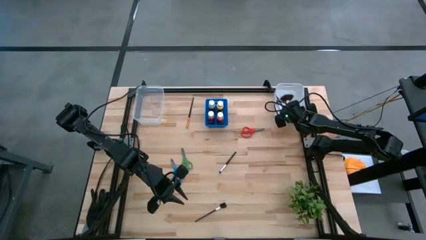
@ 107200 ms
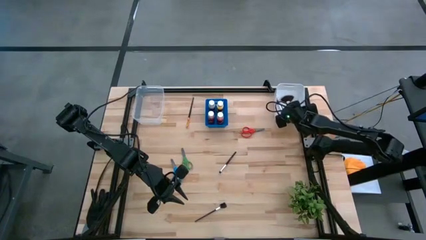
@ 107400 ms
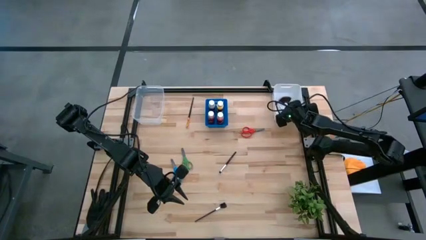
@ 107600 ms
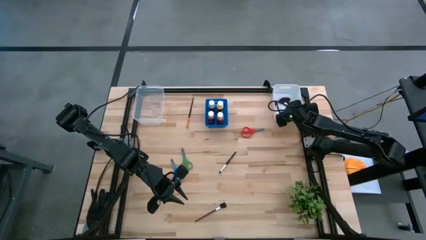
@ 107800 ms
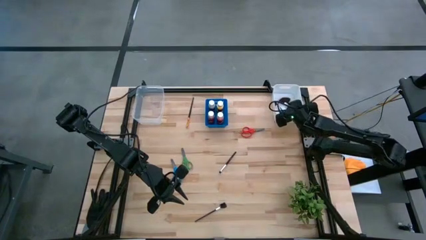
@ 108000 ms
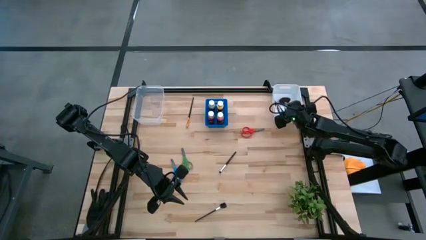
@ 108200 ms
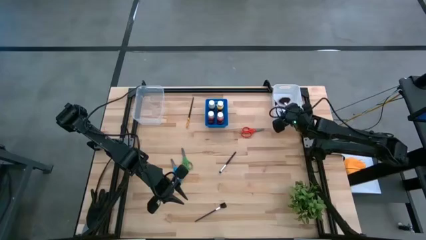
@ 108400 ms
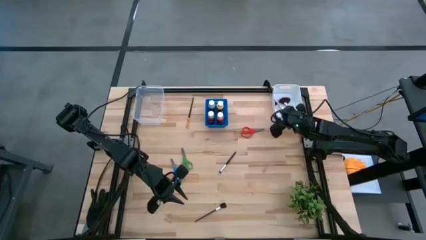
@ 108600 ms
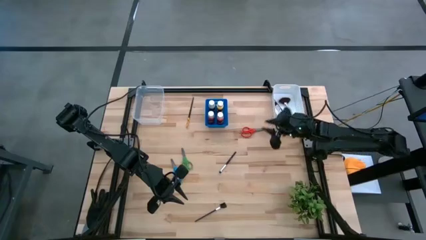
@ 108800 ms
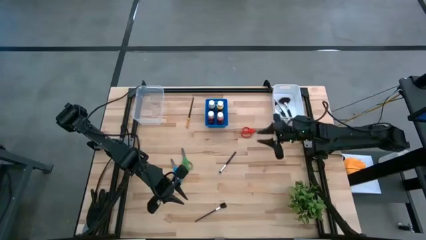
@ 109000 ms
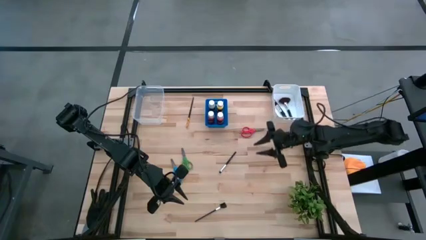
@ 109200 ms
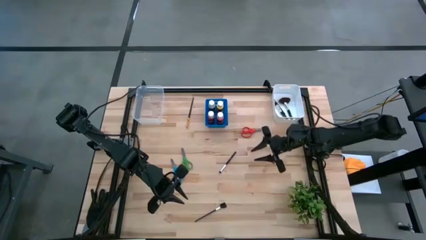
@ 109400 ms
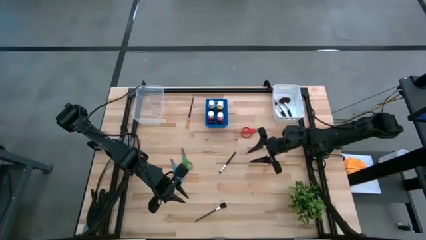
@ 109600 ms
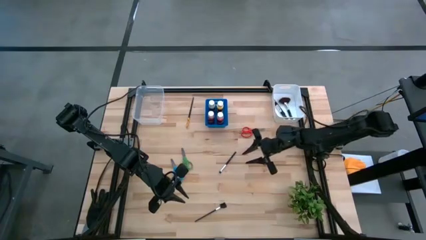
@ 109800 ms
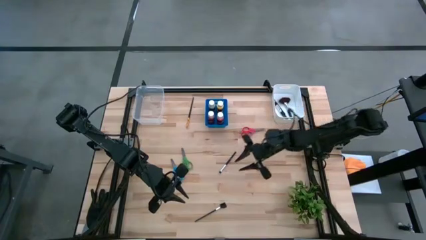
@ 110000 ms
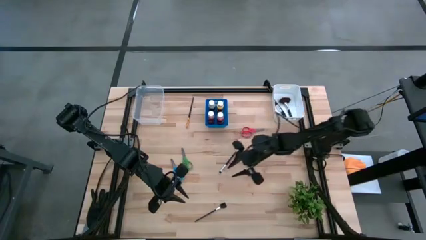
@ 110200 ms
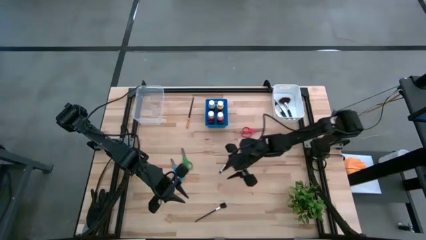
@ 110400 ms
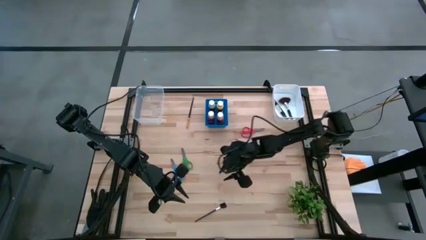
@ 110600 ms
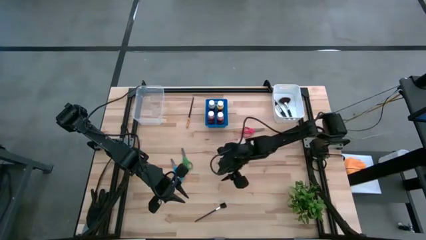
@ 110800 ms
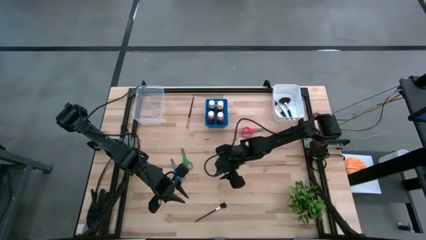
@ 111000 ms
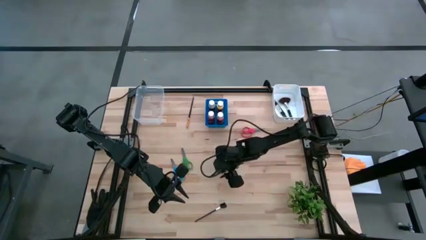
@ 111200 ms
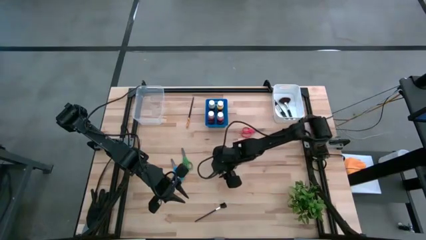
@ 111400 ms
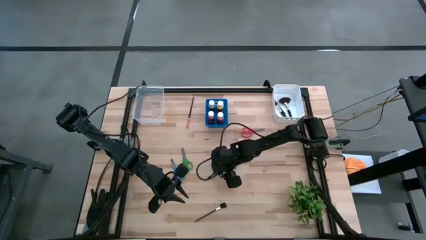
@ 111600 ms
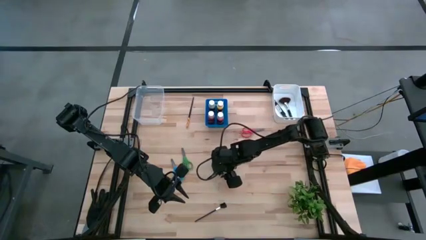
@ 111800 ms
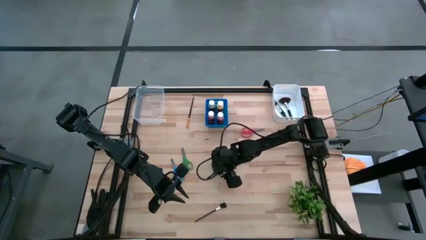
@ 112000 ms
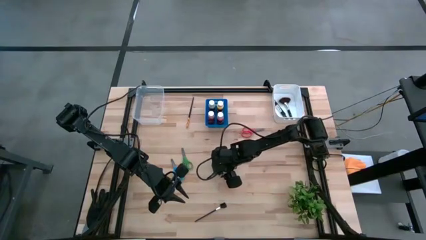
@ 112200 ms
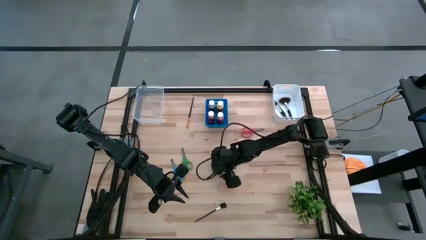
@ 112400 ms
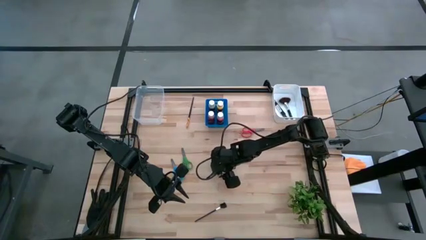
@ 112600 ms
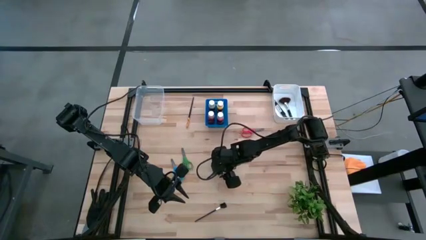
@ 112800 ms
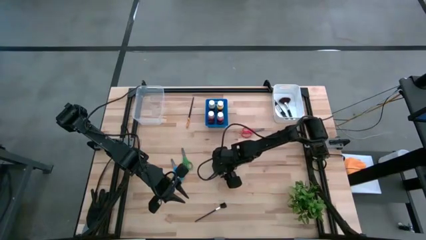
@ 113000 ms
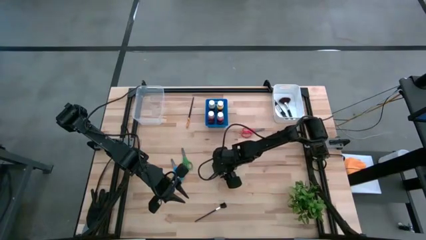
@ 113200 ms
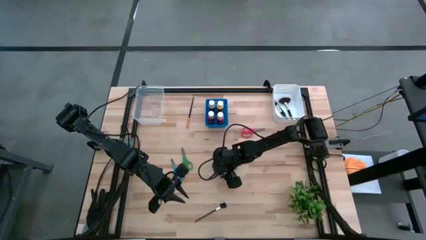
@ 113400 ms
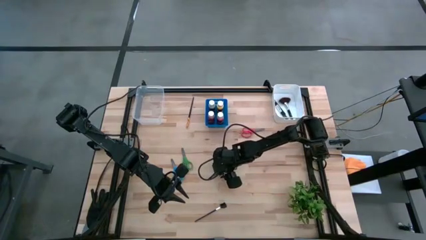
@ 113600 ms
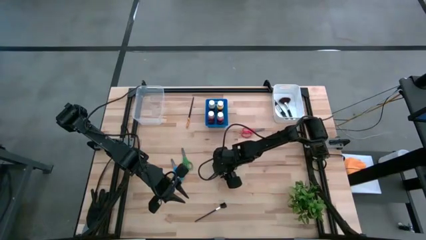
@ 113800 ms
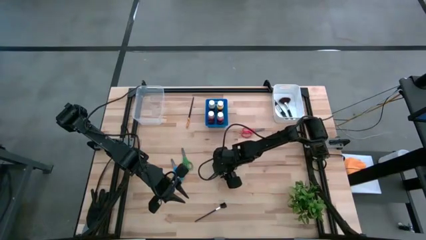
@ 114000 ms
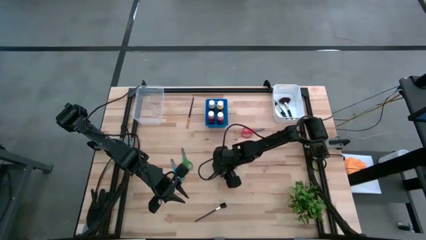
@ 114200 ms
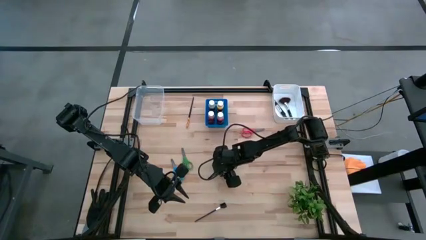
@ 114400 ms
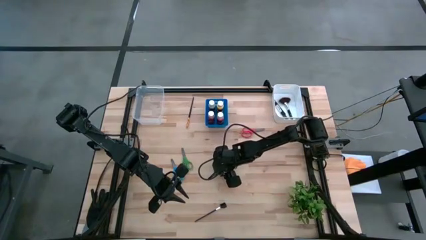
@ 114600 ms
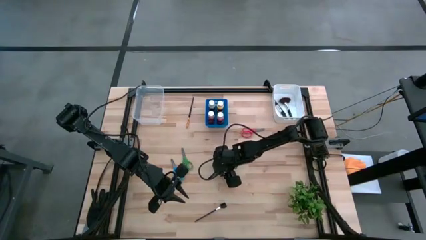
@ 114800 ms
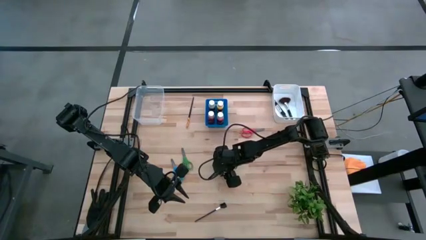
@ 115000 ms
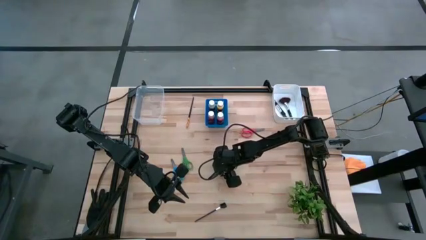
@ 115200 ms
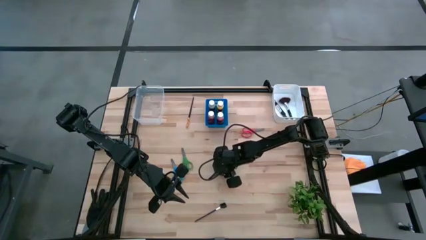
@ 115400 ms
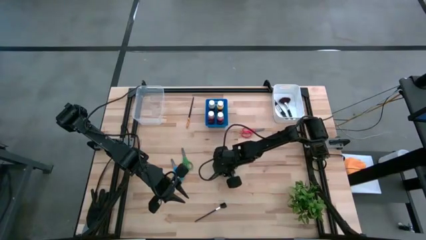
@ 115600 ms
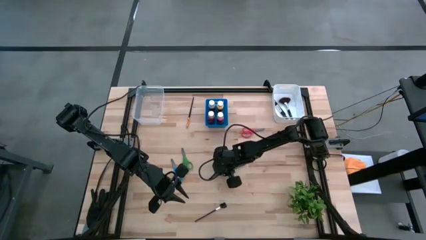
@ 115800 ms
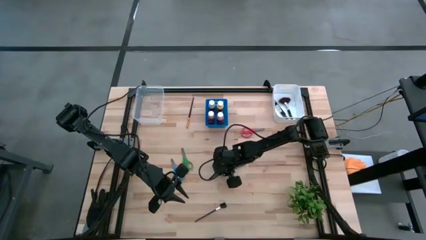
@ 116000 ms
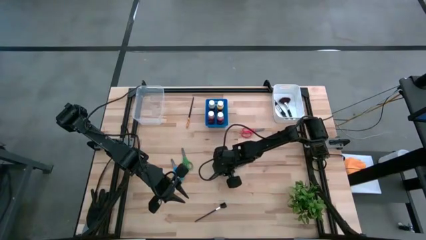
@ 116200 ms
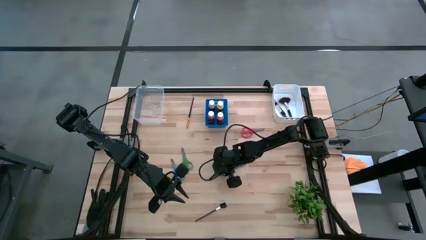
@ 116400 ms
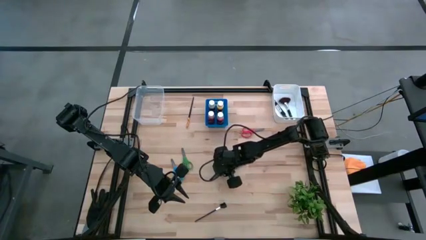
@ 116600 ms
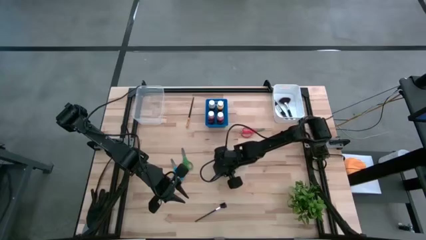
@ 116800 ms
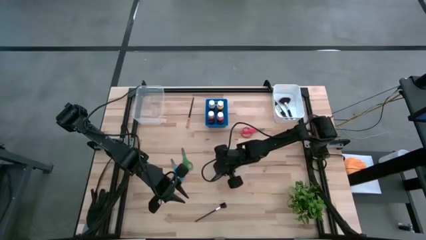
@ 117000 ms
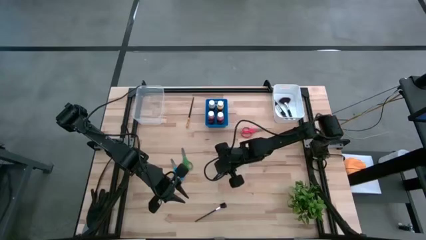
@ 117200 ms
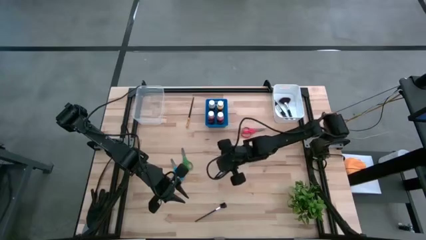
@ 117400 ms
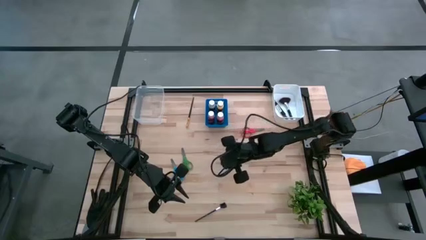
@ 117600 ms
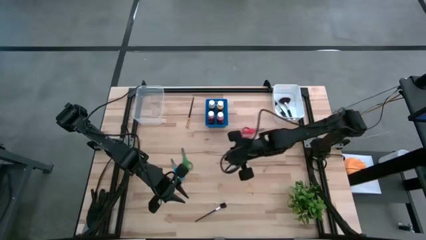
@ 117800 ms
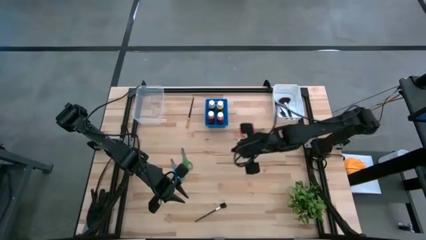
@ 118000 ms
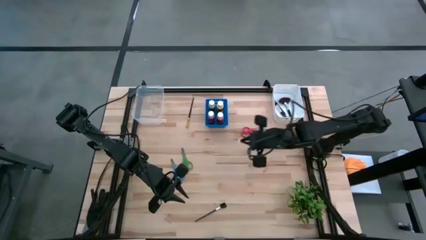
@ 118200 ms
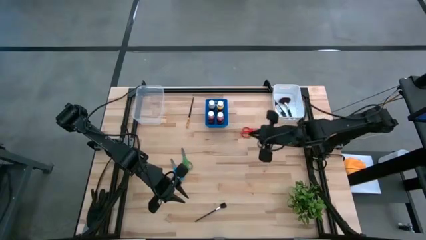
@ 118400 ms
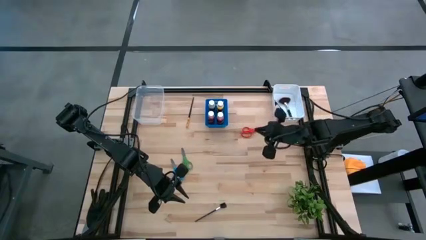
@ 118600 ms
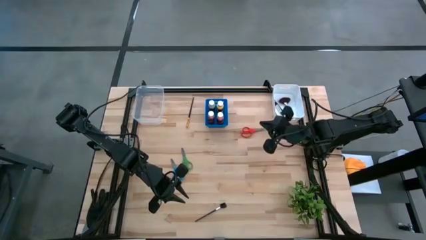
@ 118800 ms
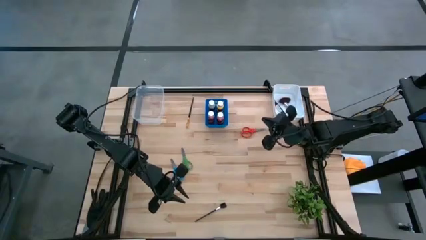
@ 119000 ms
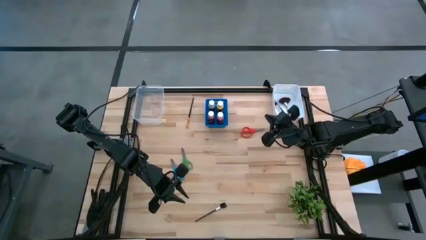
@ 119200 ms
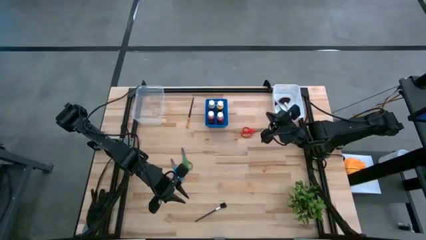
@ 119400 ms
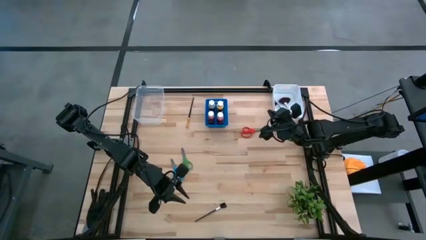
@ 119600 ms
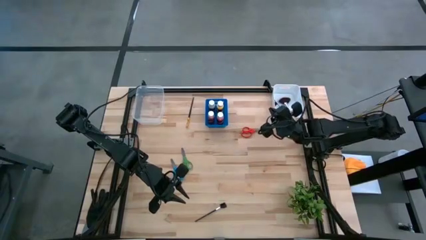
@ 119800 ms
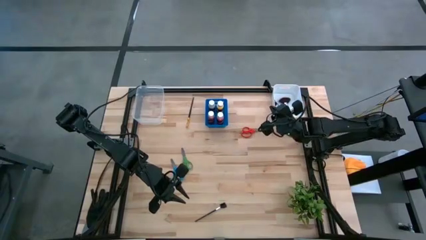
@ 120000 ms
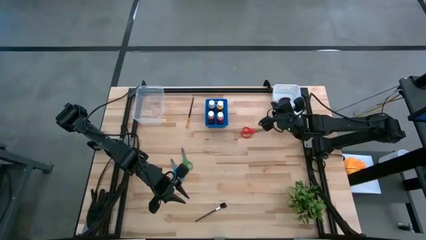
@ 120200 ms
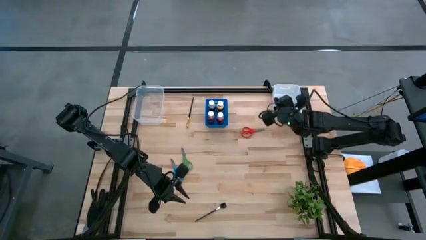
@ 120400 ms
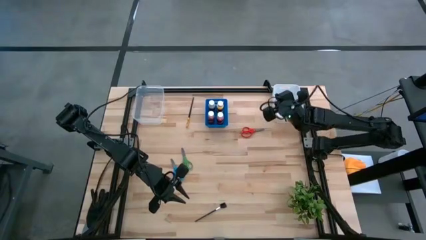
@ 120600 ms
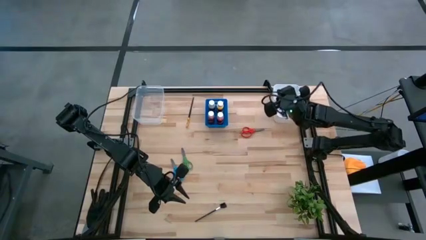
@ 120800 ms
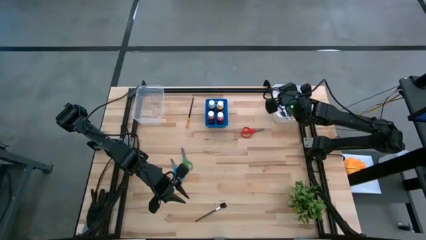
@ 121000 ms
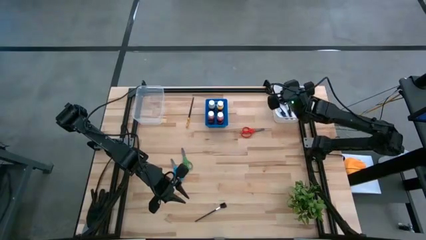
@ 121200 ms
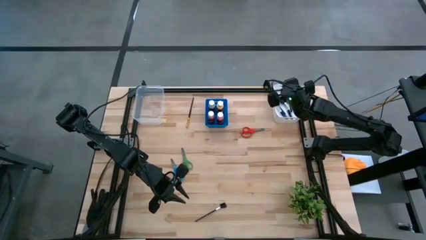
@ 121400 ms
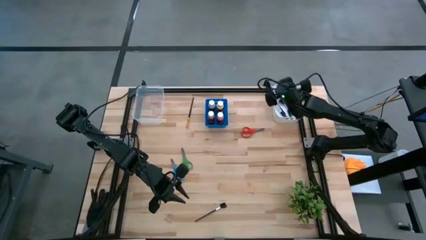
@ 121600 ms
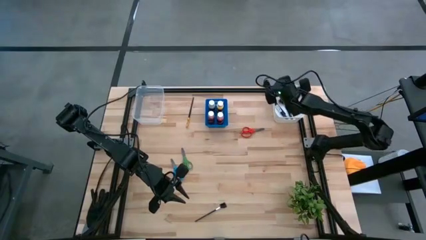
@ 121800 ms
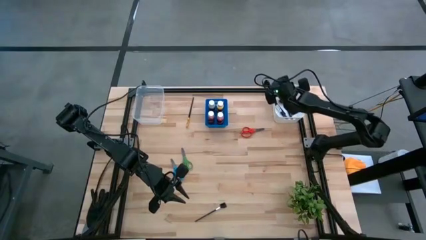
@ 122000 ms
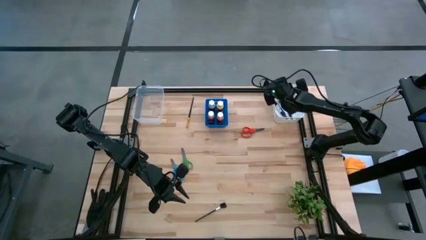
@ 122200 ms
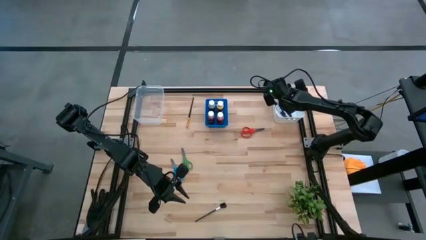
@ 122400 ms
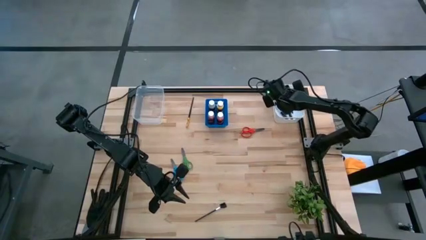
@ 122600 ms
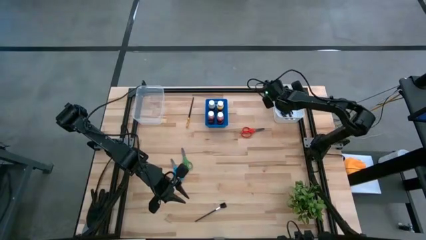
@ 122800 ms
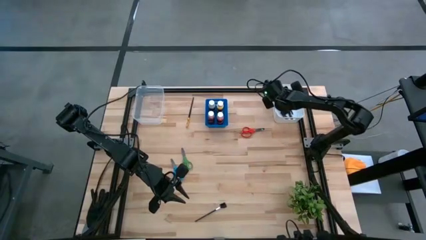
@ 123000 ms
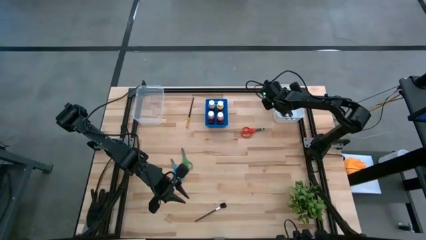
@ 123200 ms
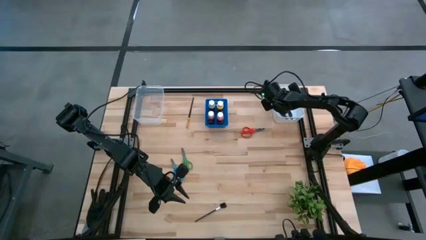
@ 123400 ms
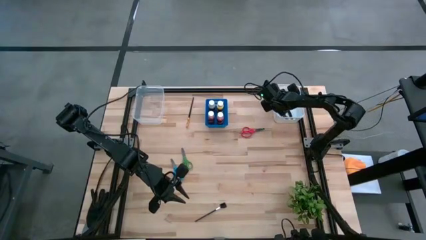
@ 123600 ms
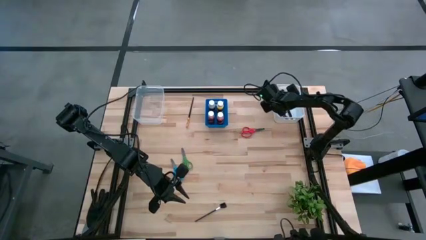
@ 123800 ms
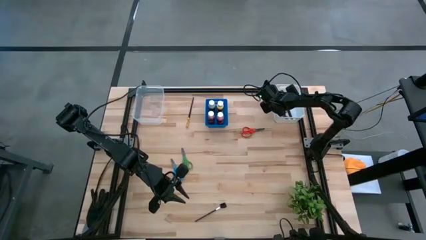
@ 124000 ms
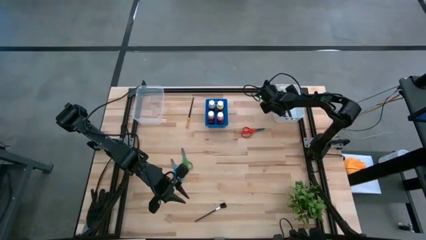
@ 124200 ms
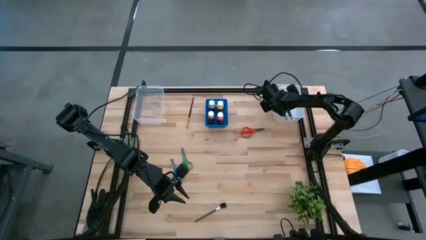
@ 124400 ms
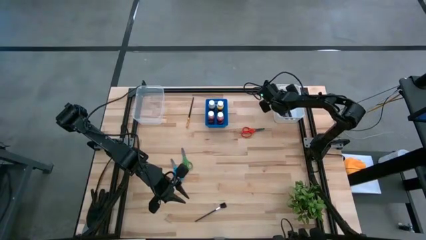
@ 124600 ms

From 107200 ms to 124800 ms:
Task: Pick & Place Paint Supplies
Put the black foundation brush into the white bin
